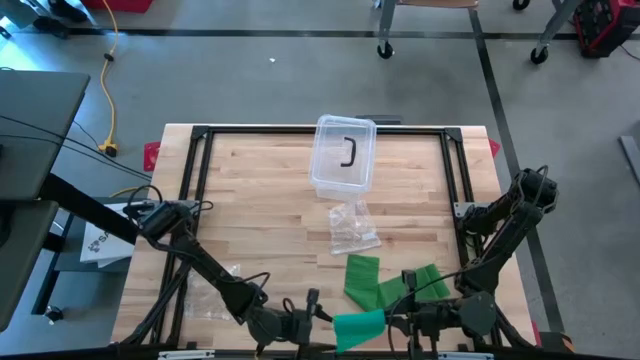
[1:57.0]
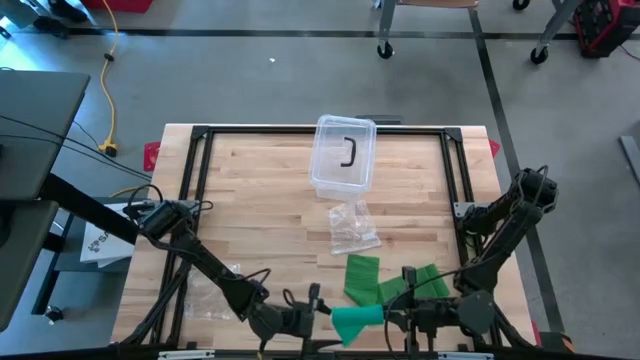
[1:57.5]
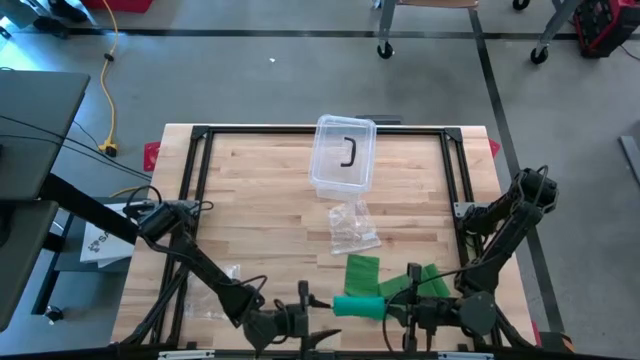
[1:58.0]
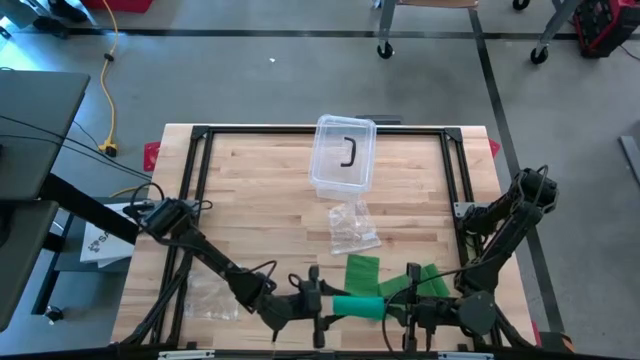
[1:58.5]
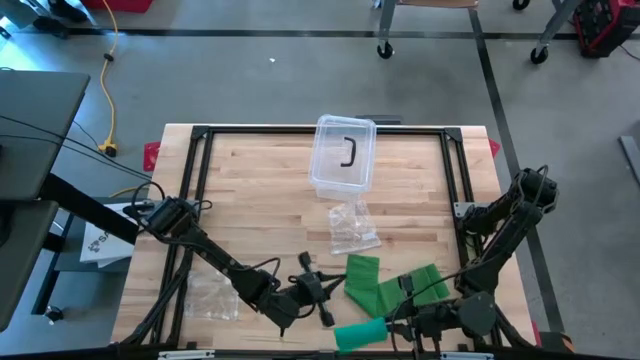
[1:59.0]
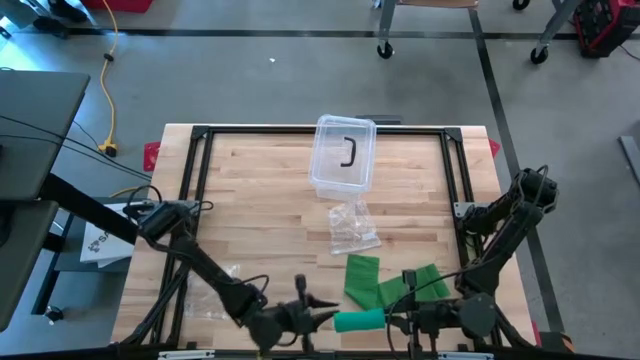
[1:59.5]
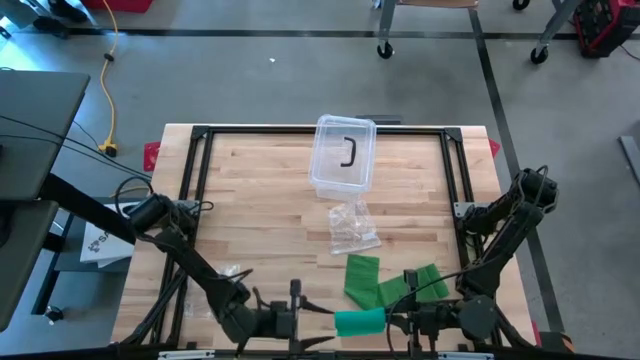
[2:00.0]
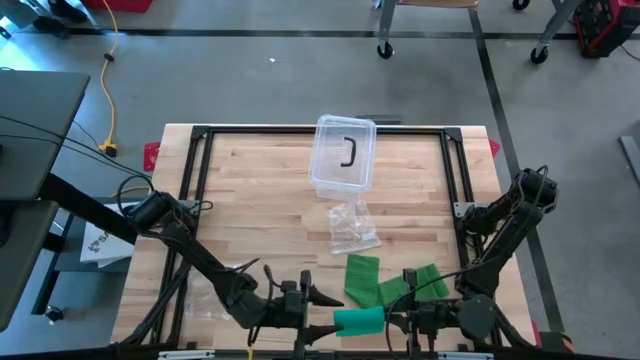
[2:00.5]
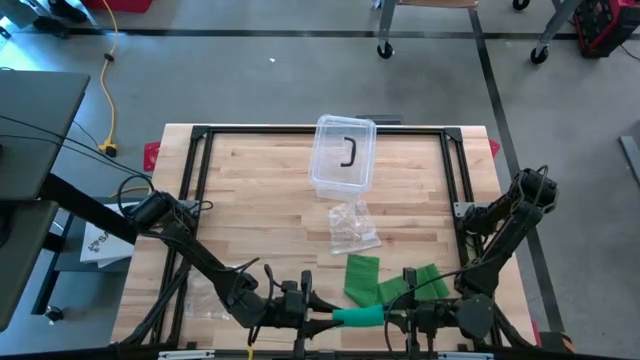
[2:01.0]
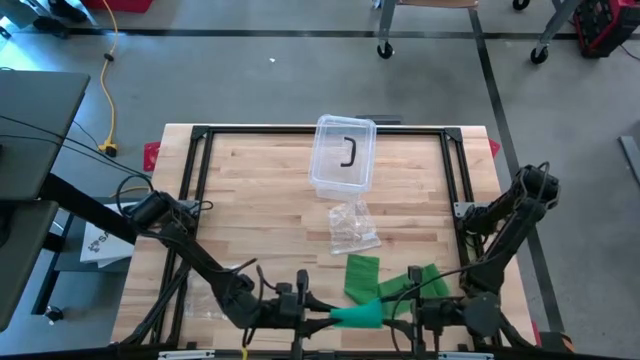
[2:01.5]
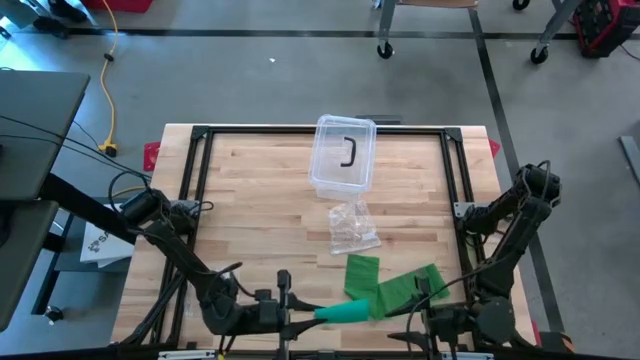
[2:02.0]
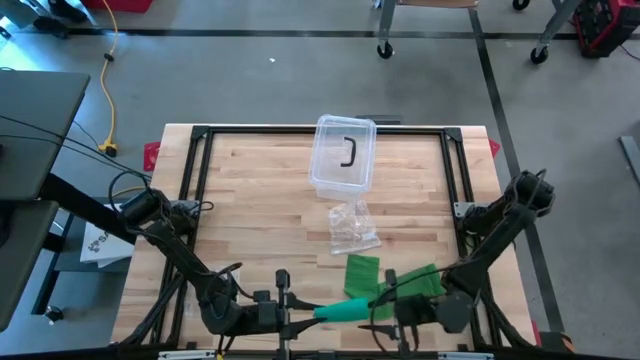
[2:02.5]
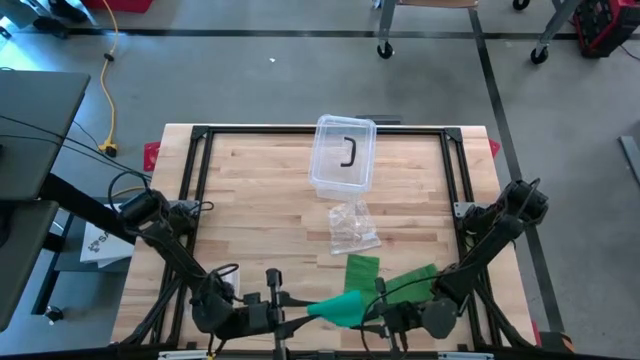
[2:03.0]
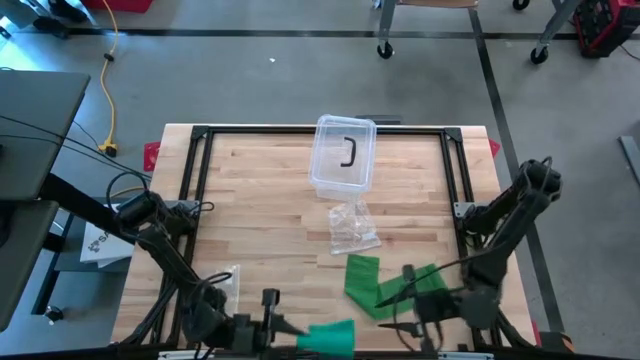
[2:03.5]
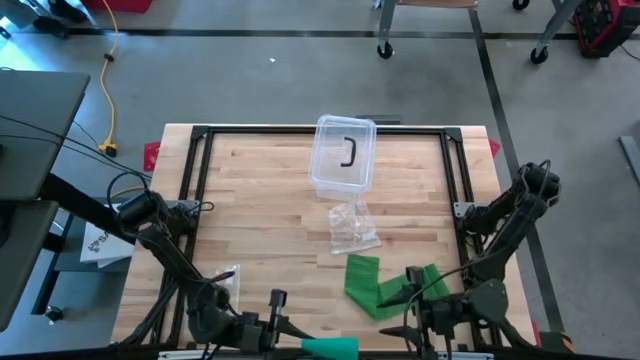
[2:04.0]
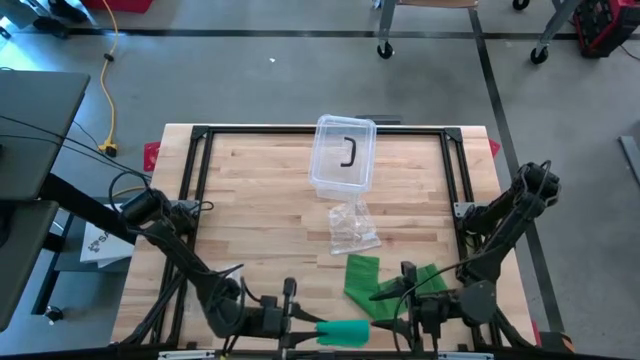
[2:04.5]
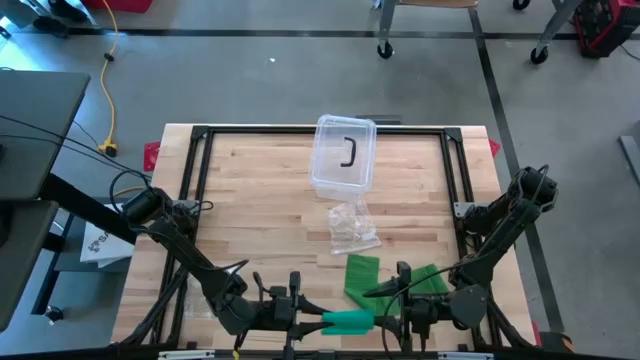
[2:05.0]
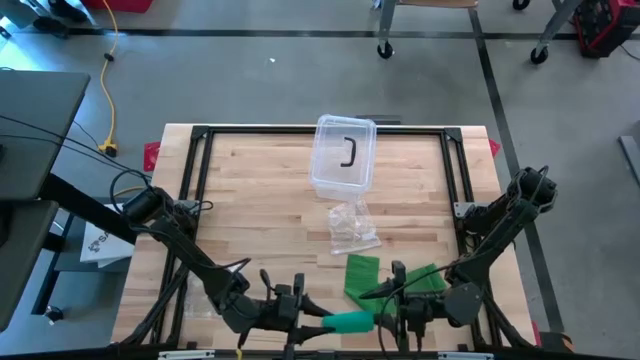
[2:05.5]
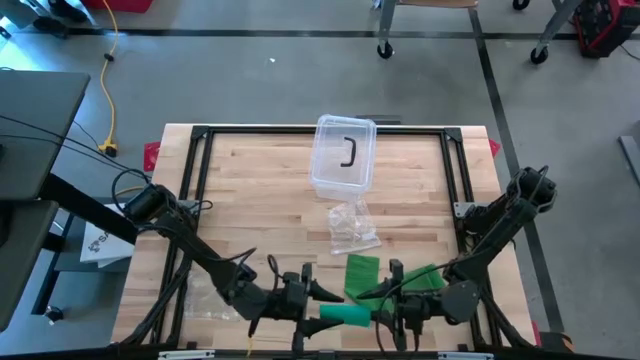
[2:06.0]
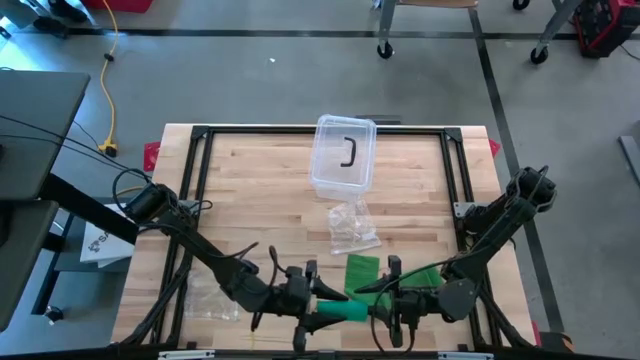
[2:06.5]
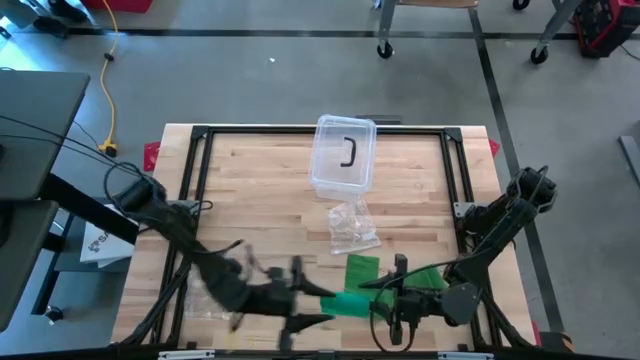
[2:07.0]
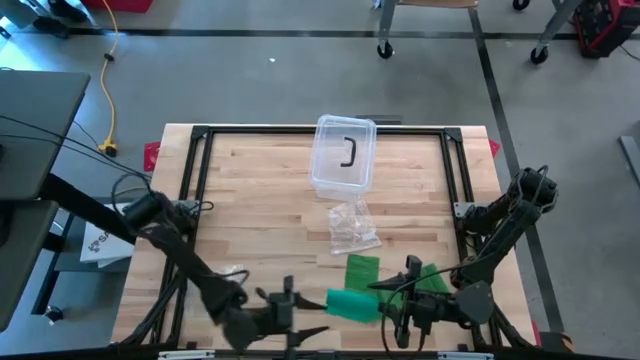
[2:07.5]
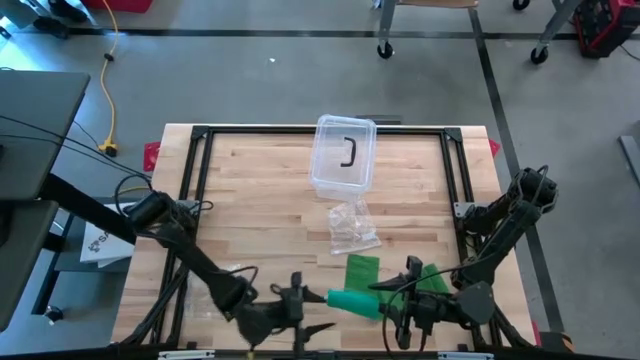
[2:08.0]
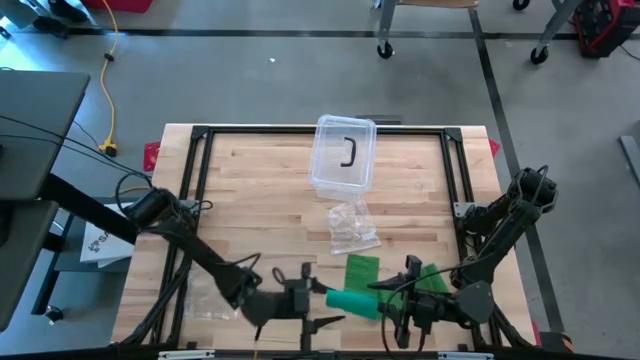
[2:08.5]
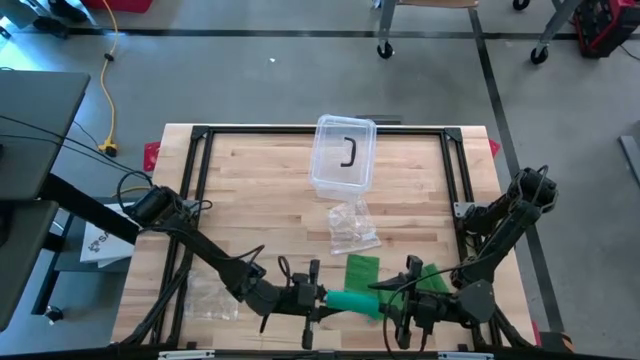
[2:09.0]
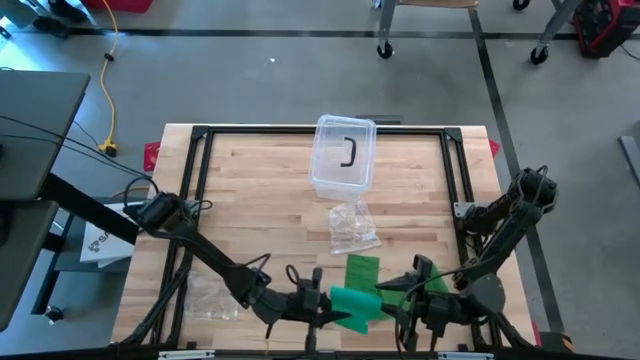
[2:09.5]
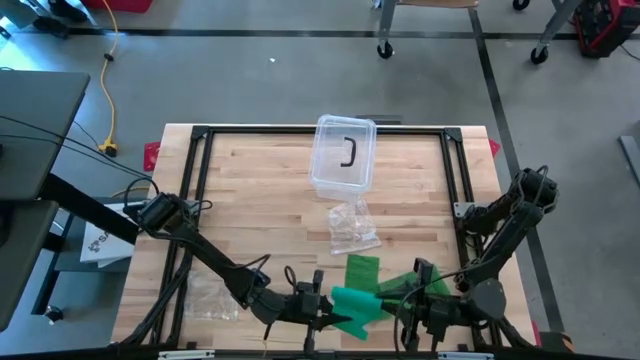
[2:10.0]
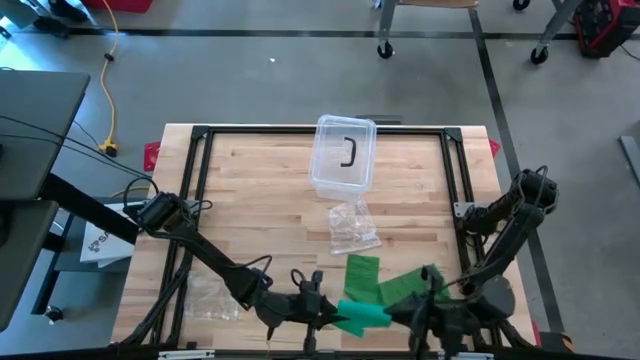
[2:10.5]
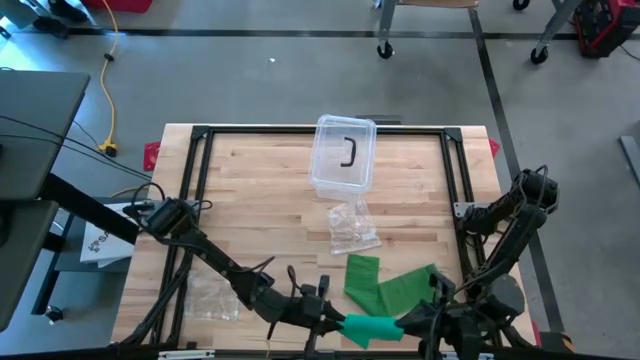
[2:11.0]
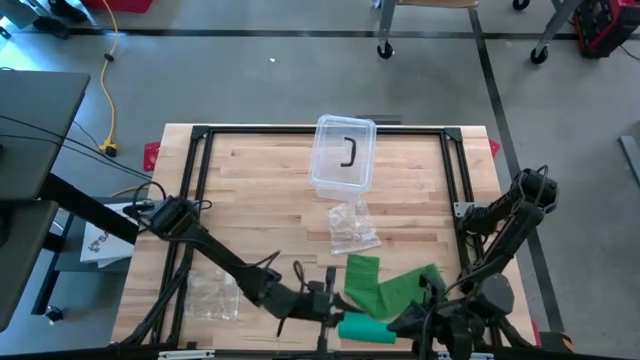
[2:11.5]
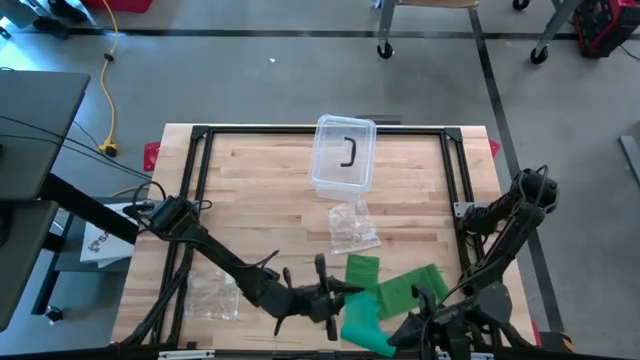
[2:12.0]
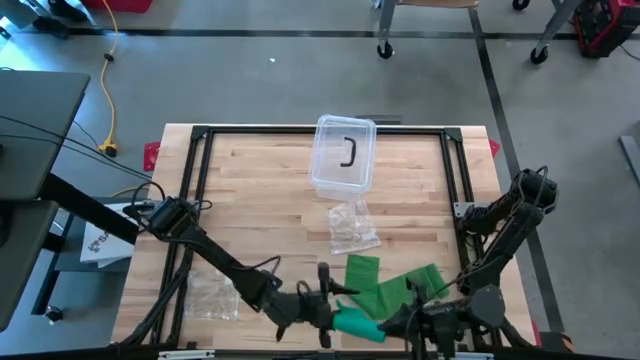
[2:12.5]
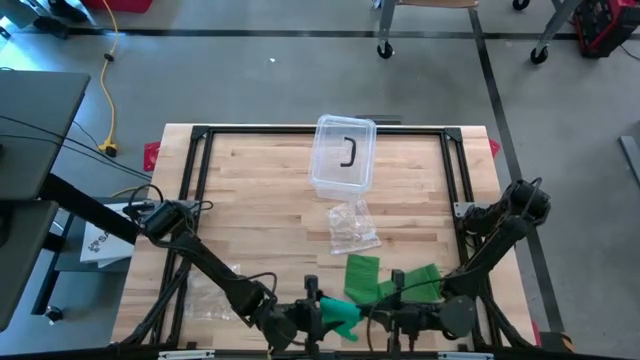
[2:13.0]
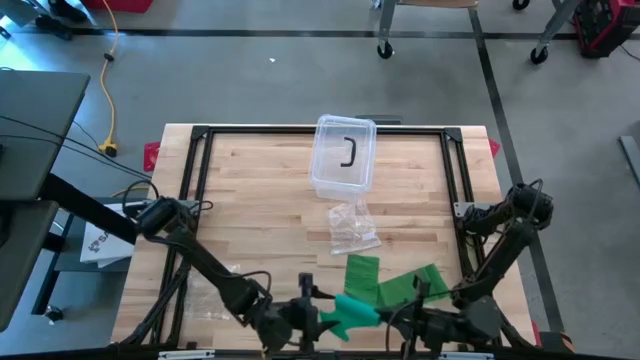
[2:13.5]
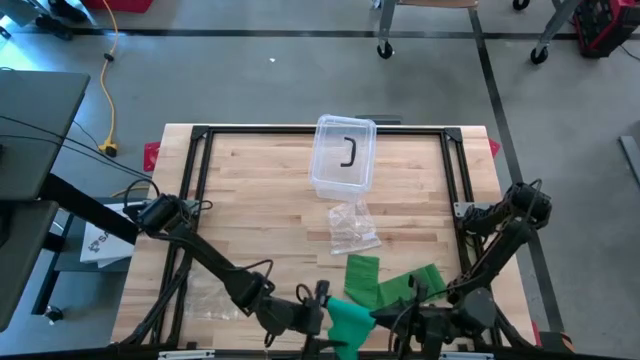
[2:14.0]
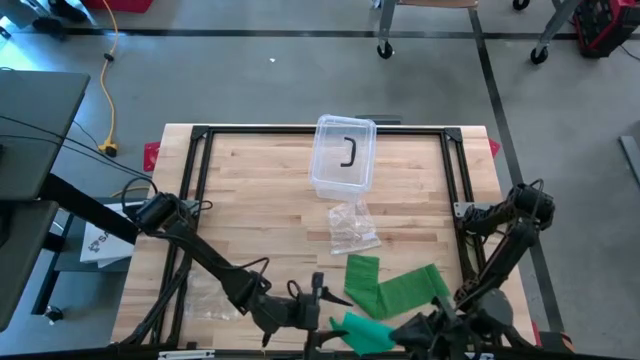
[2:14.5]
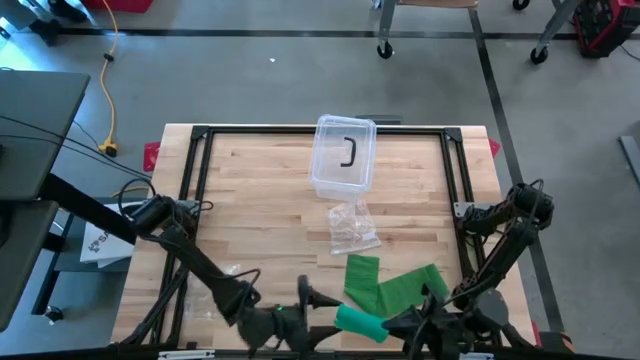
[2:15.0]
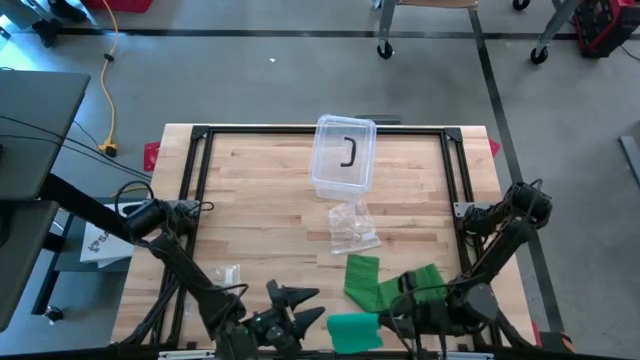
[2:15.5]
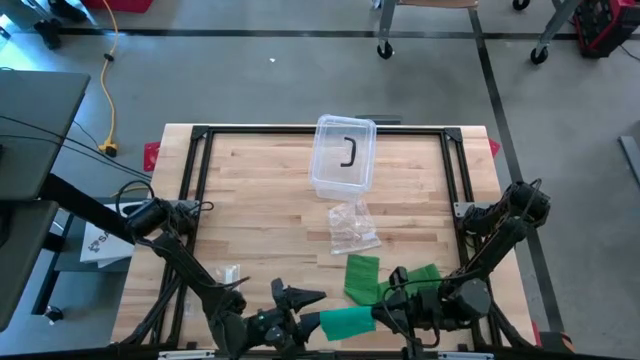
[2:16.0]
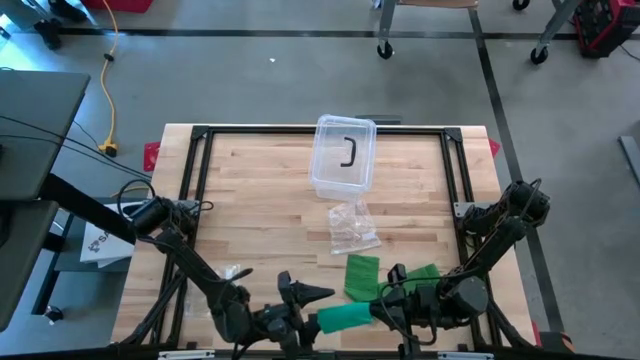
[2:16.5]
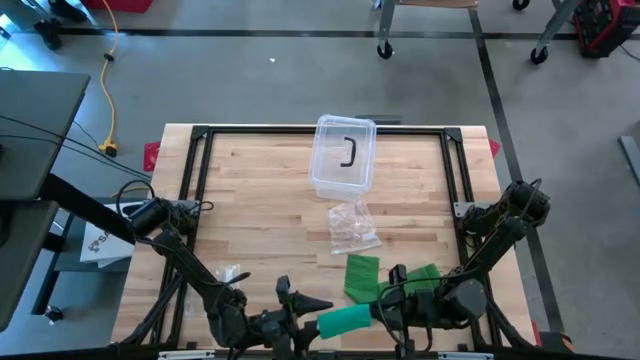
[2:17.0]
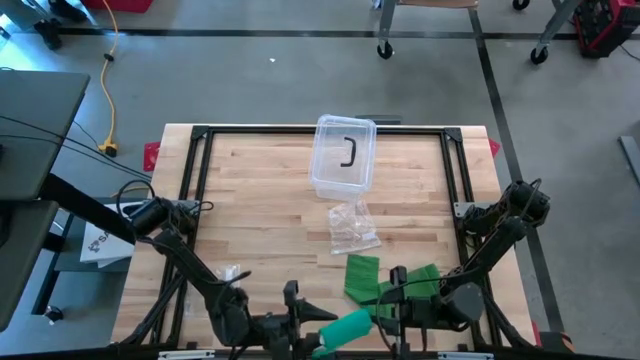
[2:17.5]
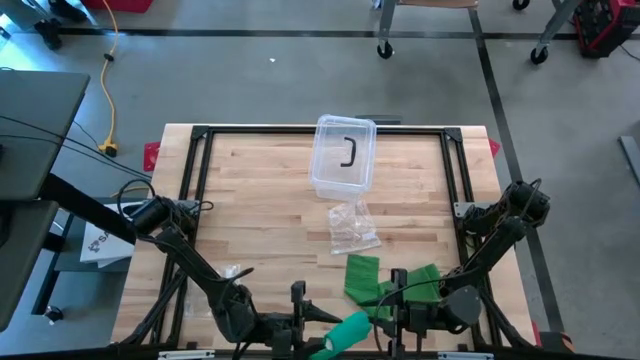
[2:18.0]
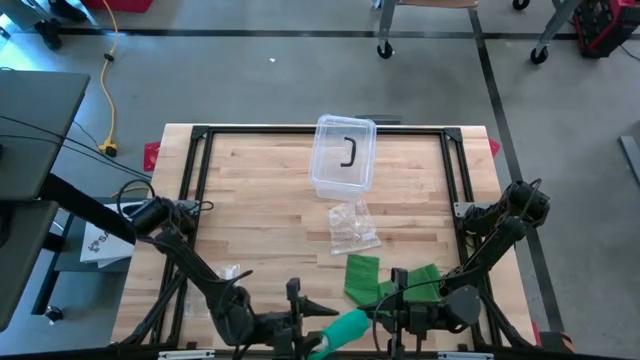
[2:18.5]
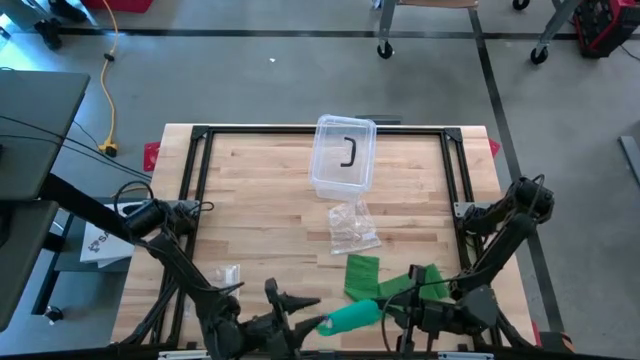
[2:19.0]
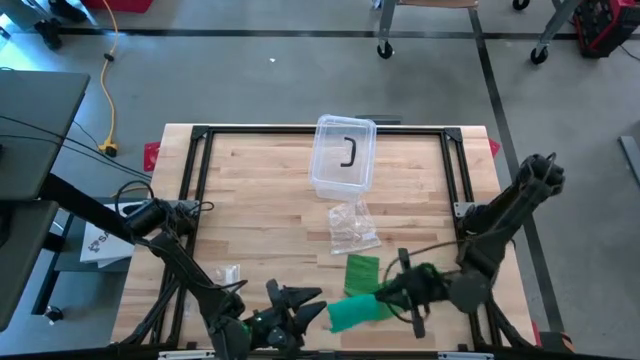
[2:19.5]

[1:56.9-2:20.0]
Task: Roll bandage
Roll the blue bandage
